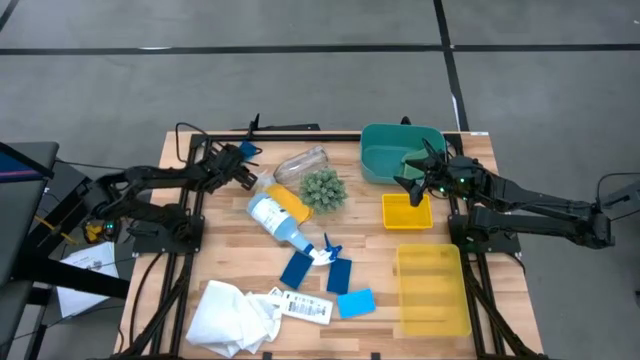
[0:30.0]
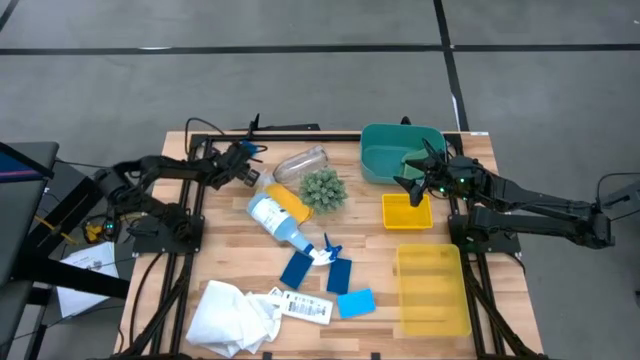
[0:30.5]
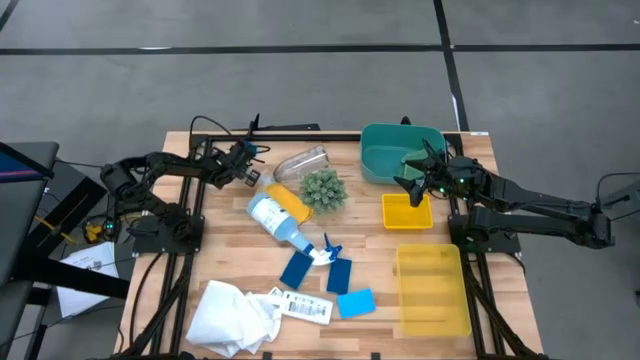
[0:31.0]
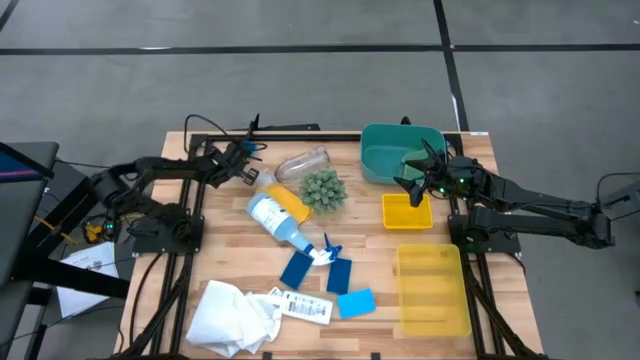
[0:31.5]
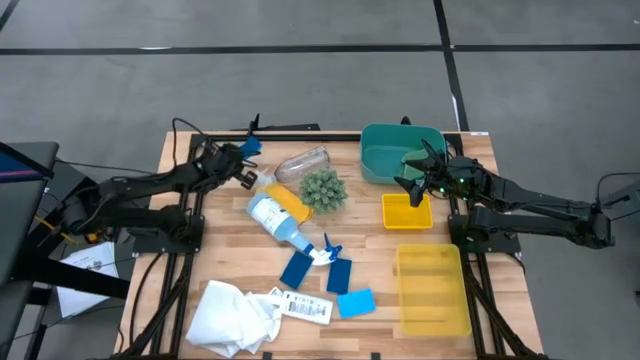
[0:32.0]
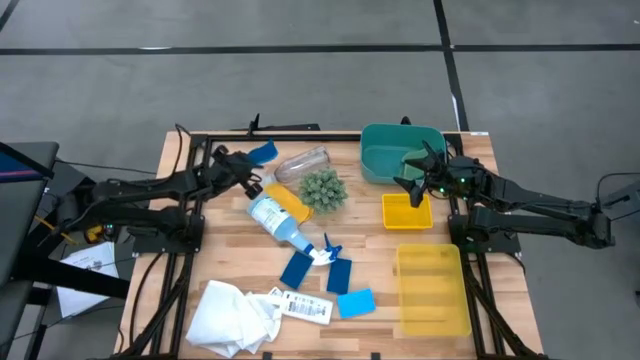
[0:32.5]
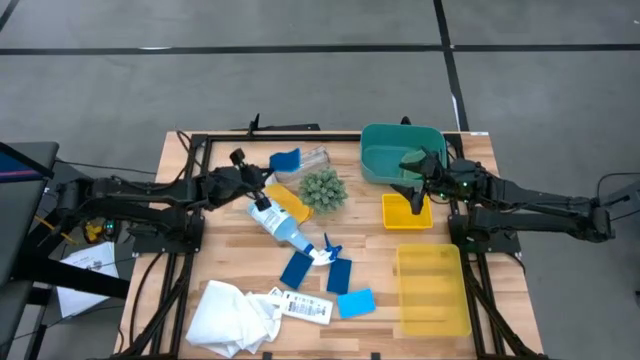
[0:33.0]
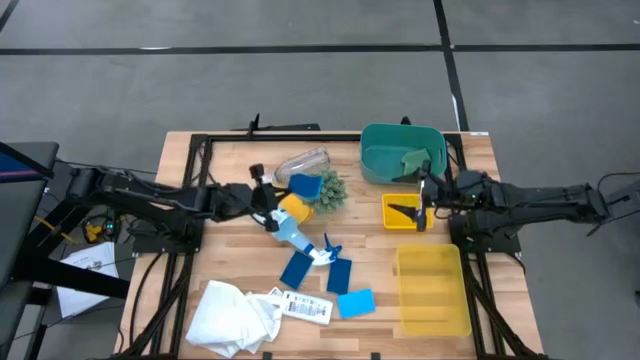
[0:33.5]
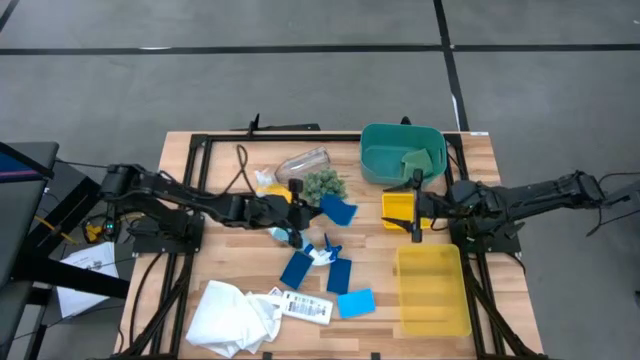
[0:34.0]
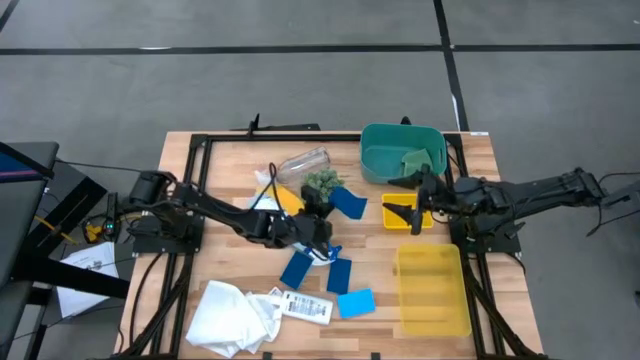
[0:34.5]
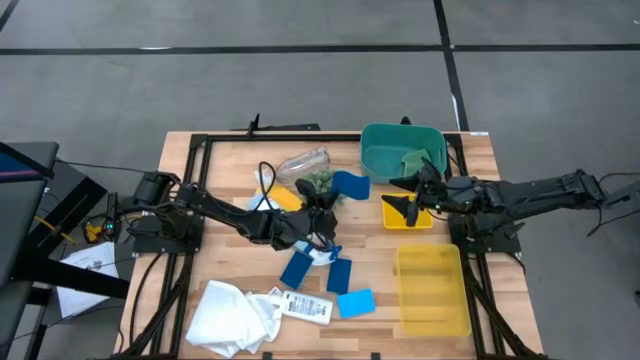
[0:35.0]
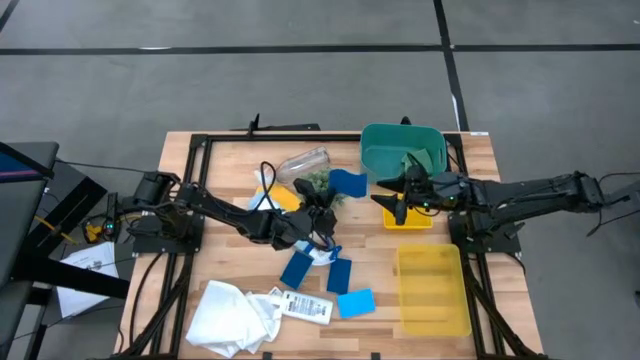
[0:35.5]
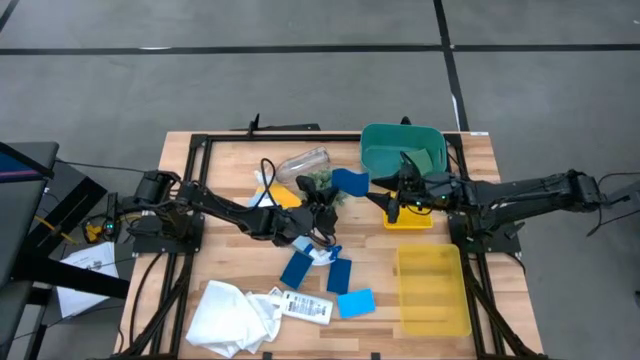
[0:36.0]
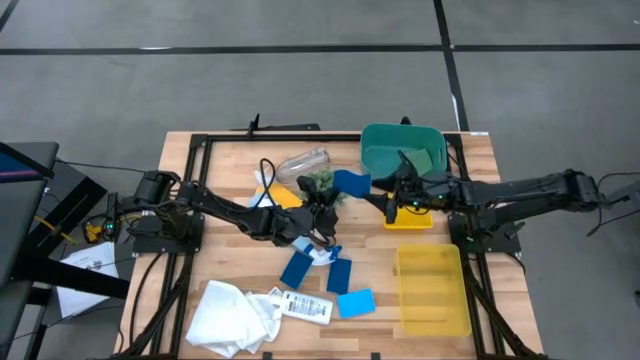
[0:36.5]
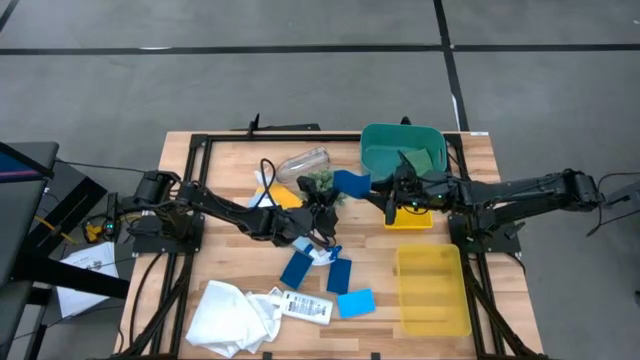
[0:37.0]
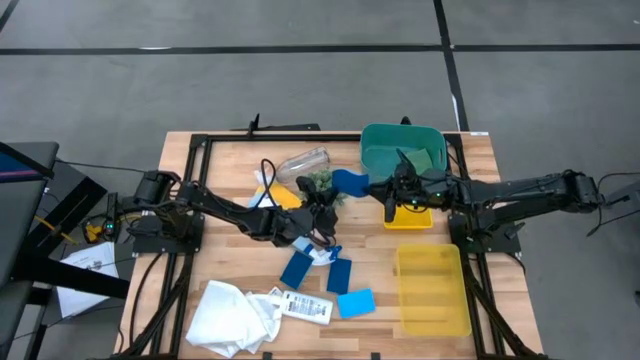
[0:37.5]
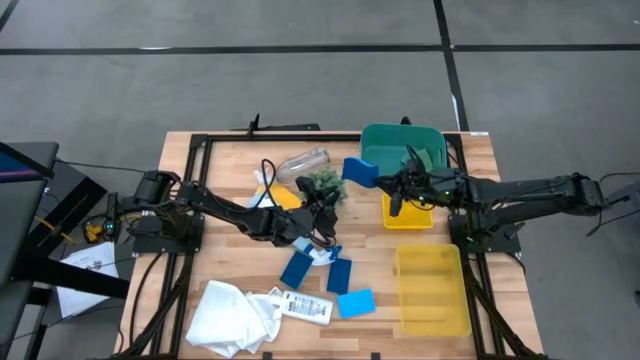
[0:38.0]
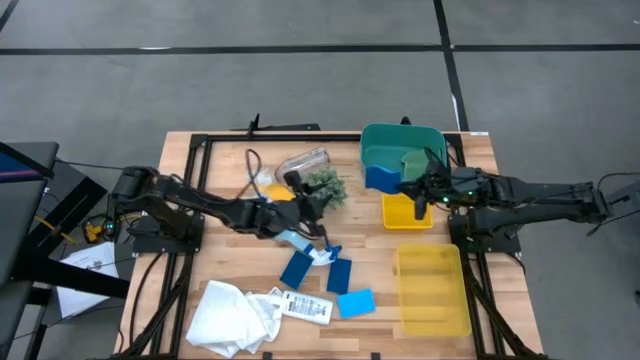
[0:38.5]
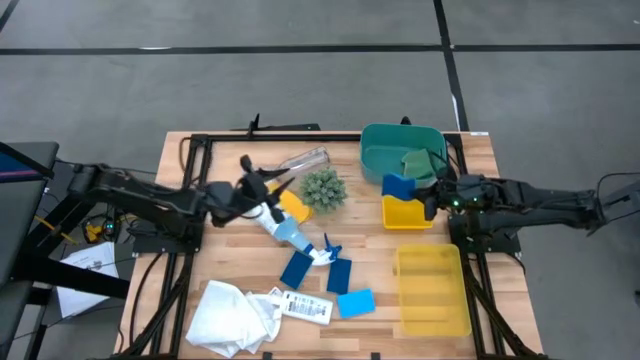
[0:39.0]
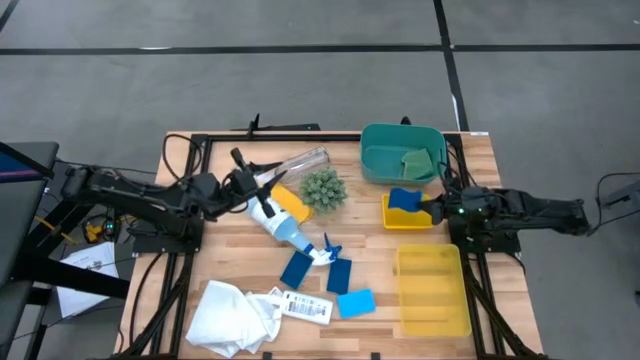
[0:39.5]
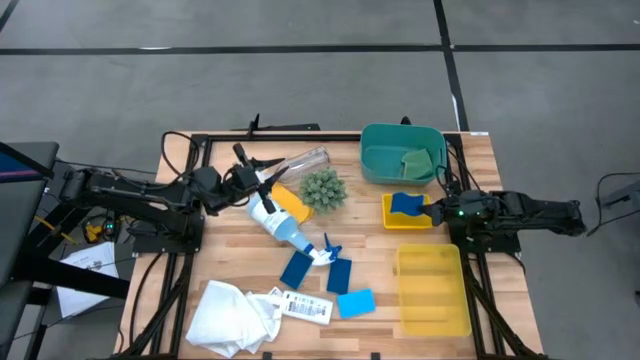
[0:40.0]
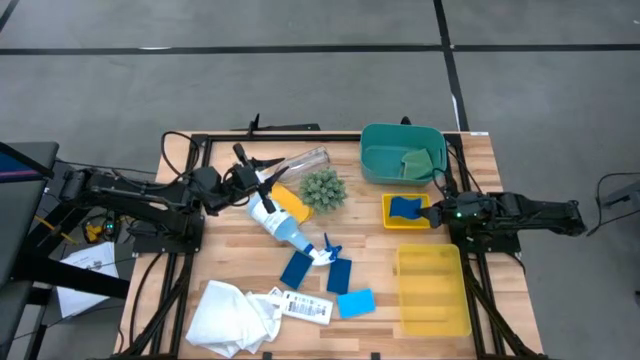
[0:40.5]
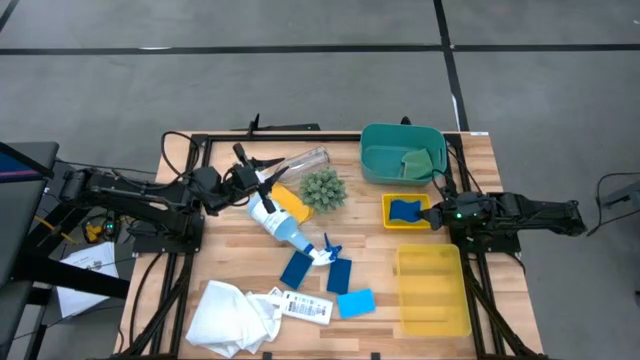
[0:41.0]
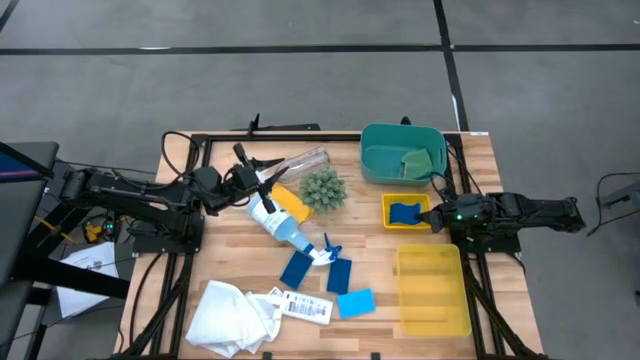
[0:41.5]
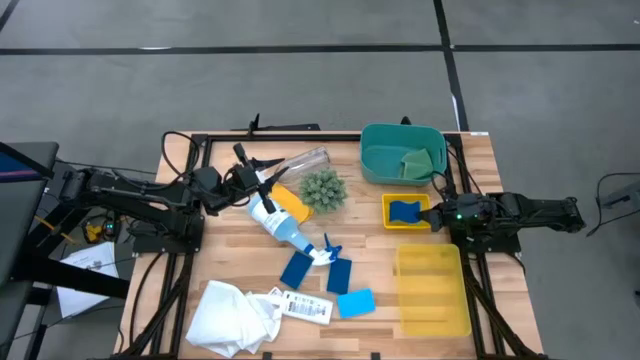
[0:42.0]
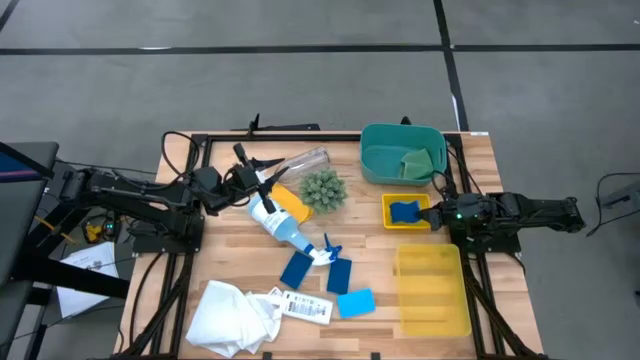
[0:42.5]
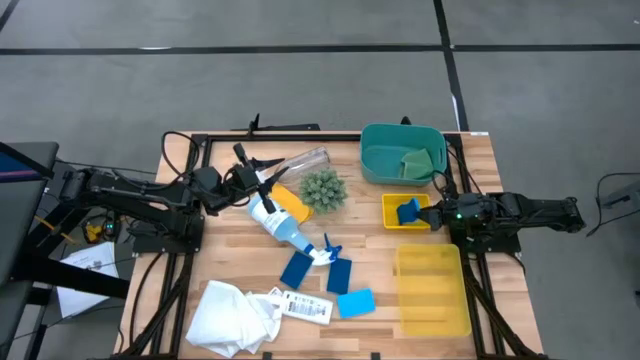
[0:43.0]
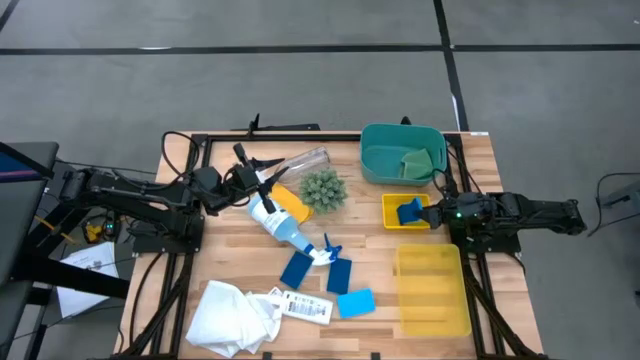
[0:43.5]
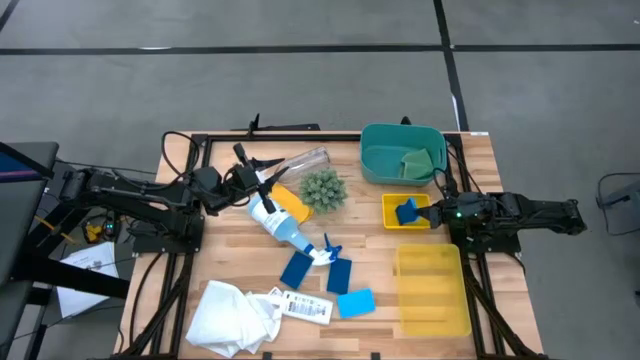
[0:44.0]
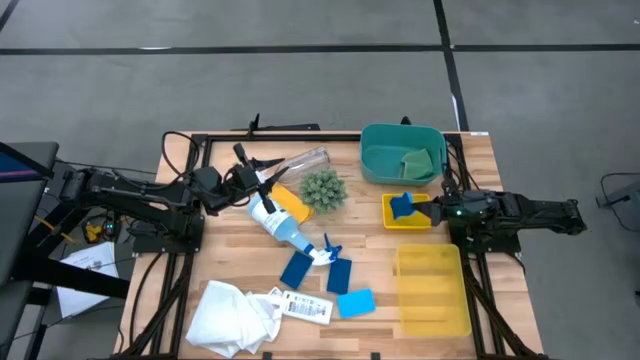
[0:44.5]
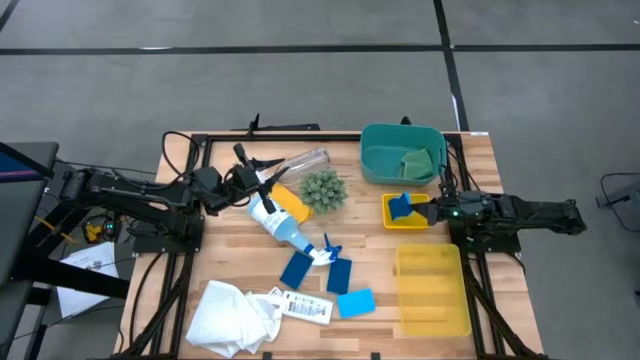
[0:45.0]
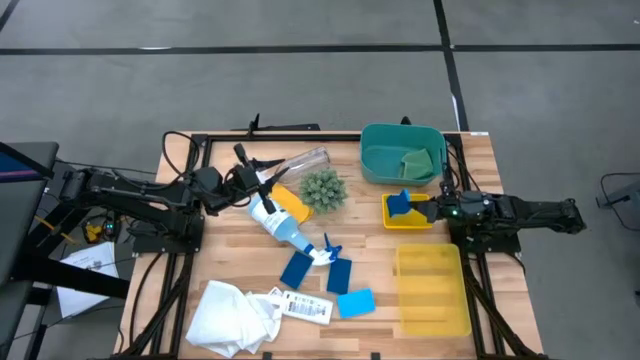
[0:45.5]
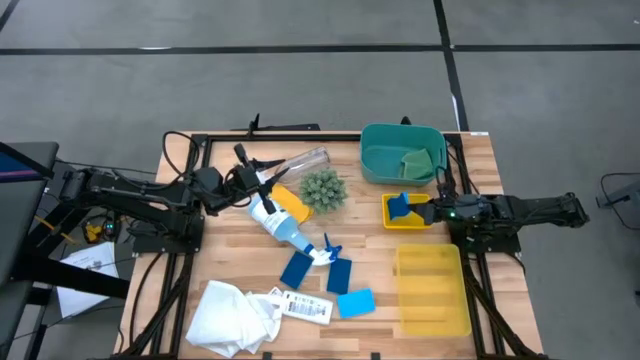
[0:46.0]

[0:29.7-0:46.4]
Task: Pick & Place Kitchen Items
Put the blue sponge into the top yellow bin

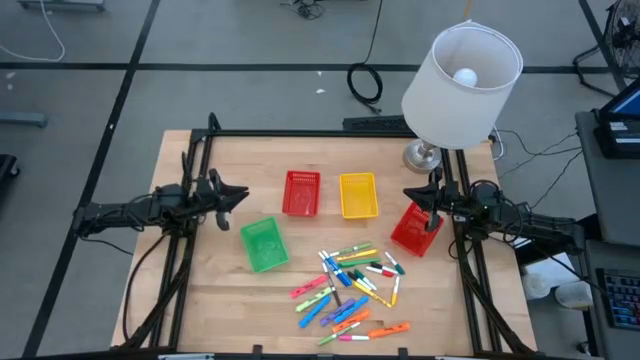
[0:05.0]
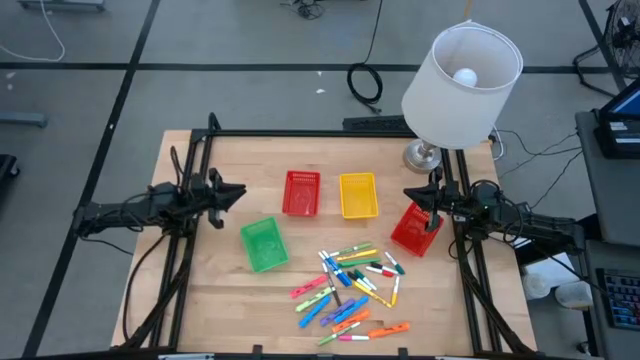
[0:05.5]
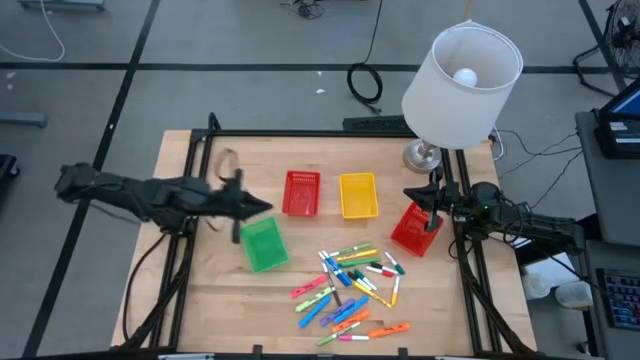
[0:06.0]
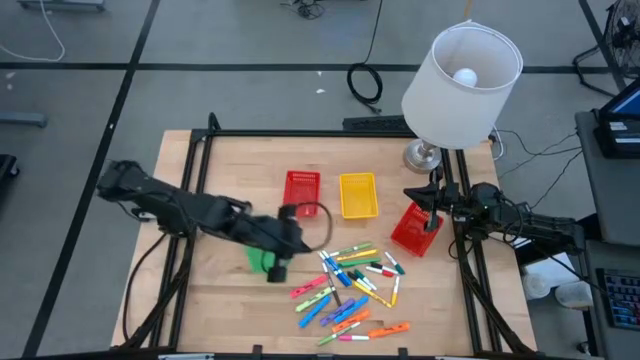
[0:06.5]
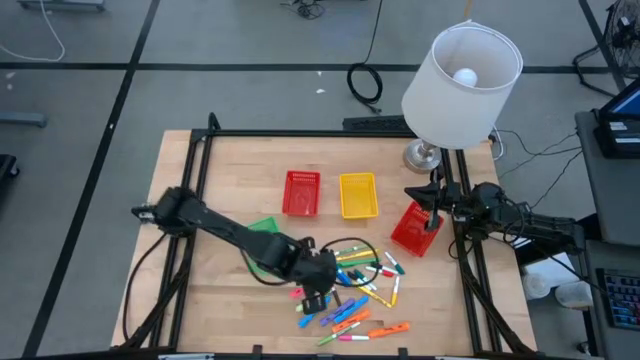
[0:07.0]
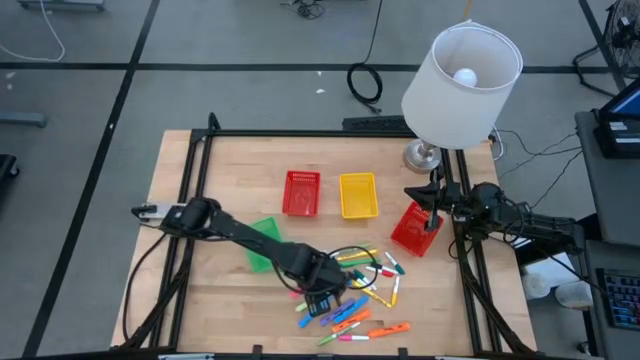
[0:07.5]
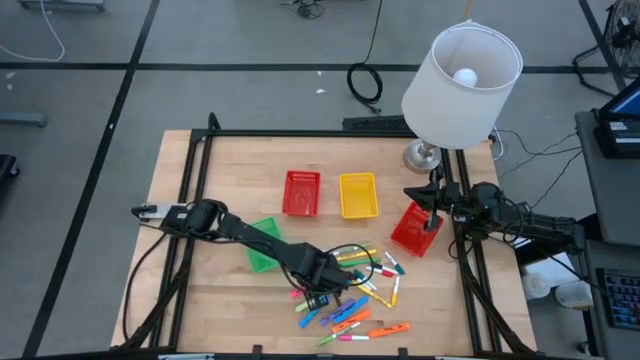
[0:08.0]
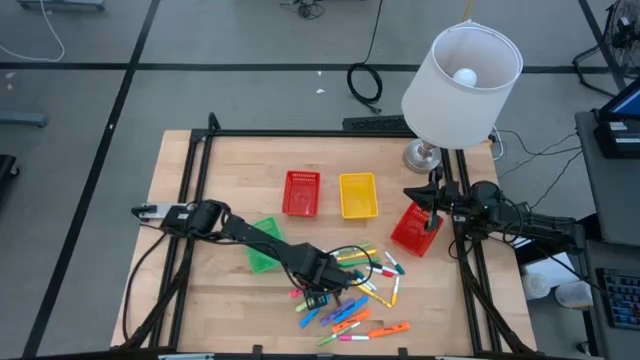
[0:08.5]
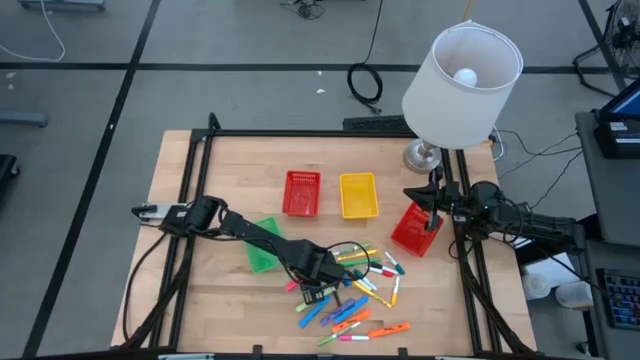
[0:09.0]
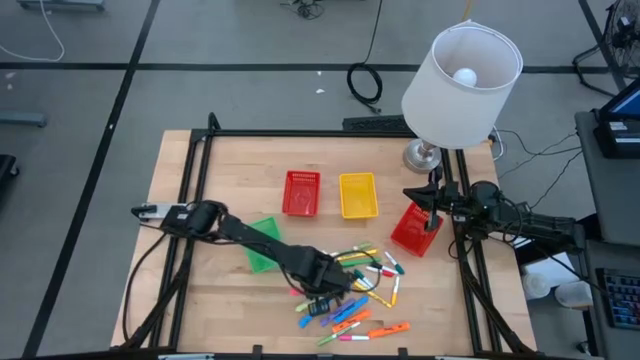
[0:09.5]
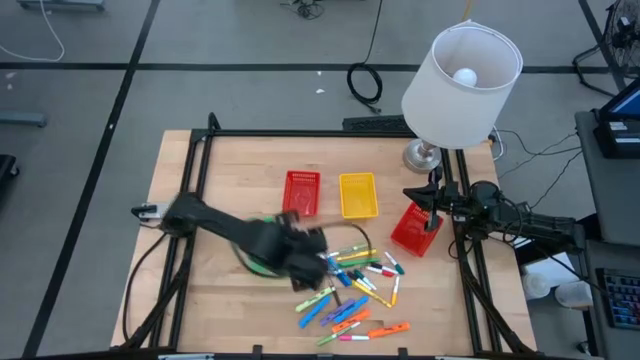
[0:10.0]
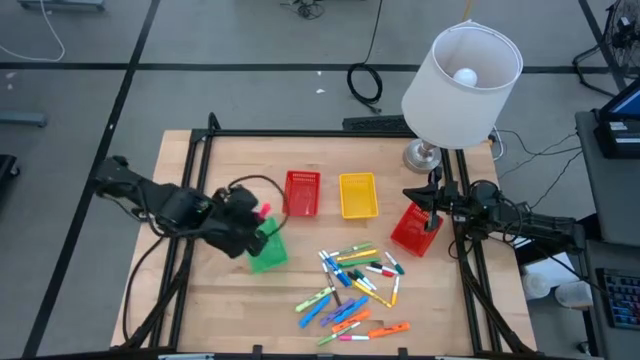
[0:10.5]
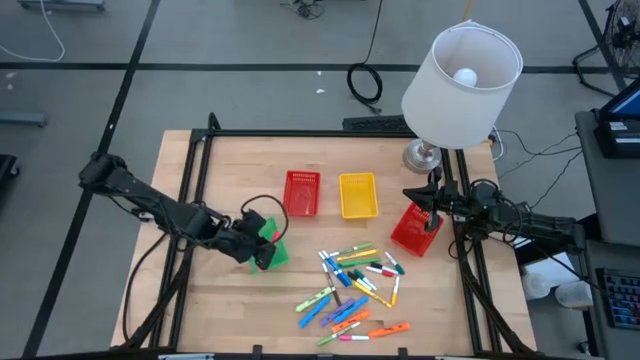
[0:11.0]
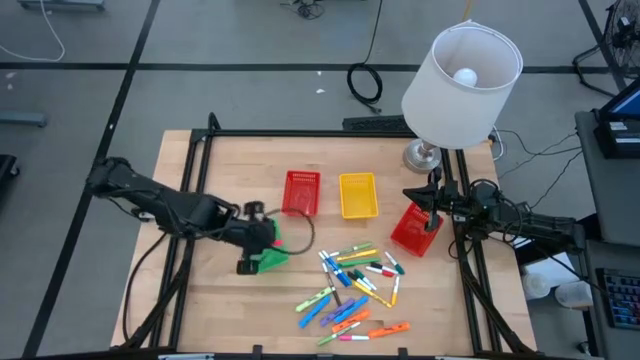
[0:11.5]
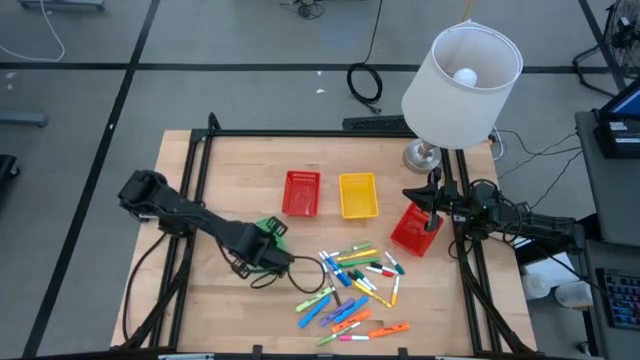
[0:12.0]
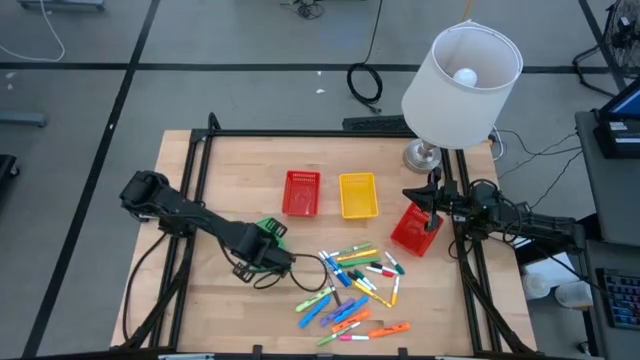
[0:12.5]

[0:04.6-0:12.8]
Task: Pick & Place Markers
Put the pink highlighter into the green bin
